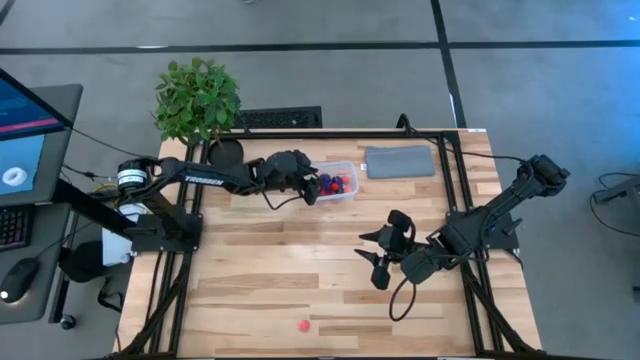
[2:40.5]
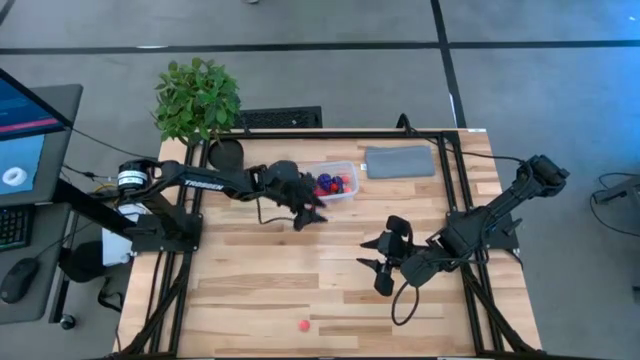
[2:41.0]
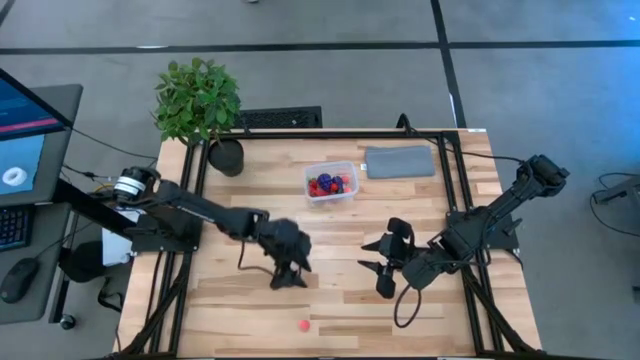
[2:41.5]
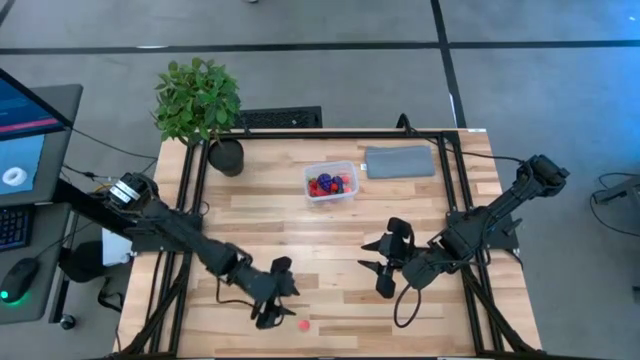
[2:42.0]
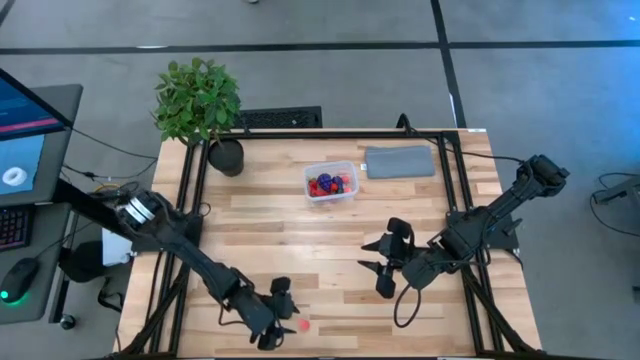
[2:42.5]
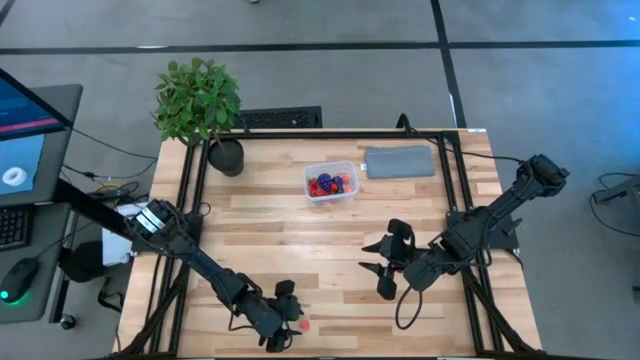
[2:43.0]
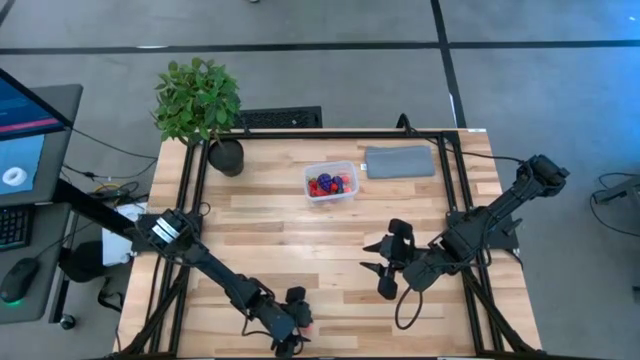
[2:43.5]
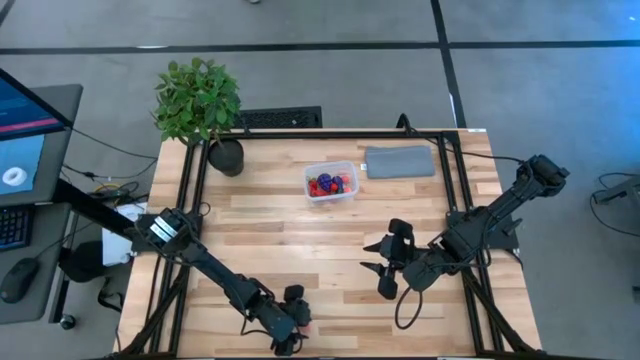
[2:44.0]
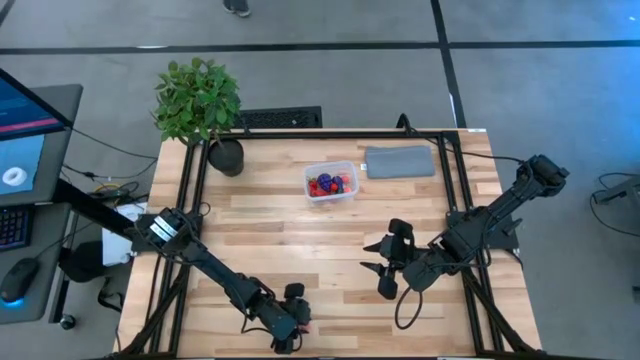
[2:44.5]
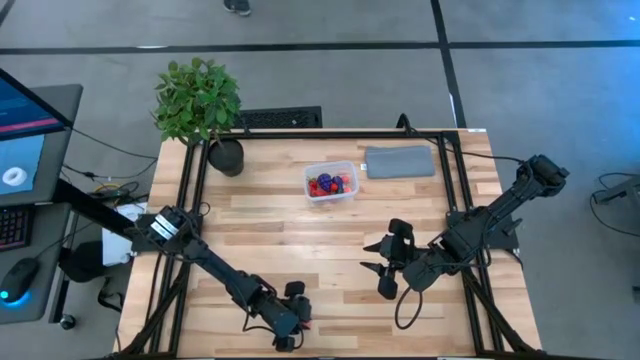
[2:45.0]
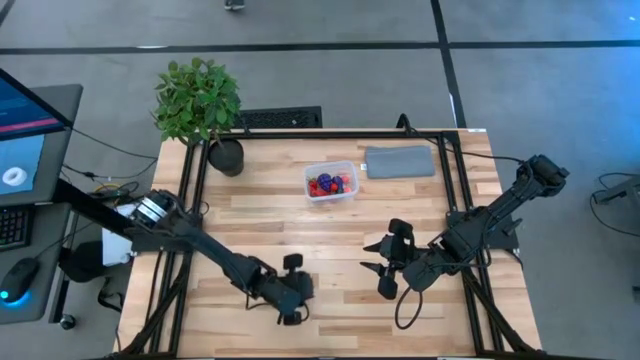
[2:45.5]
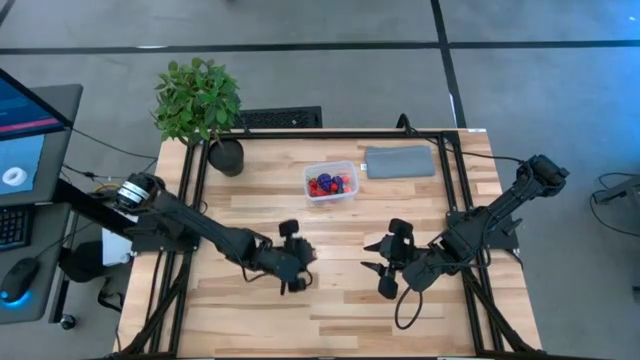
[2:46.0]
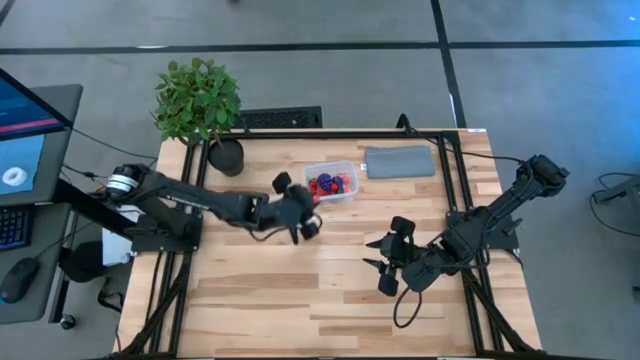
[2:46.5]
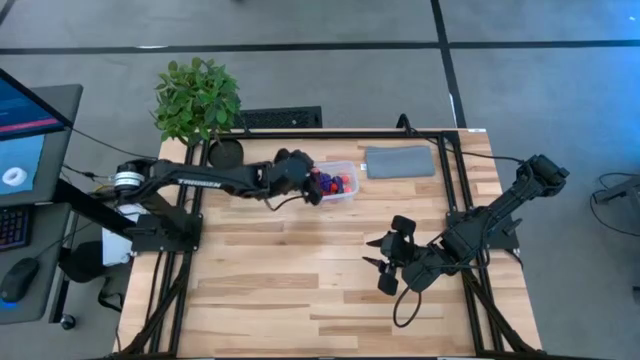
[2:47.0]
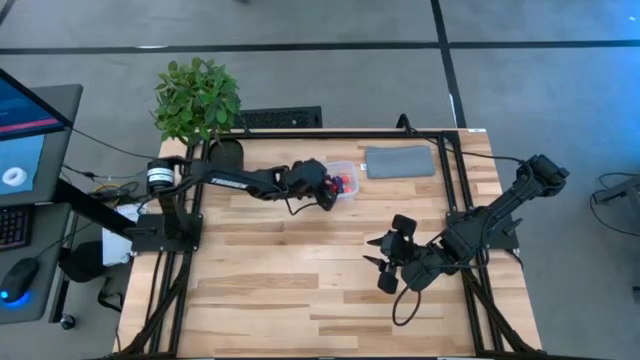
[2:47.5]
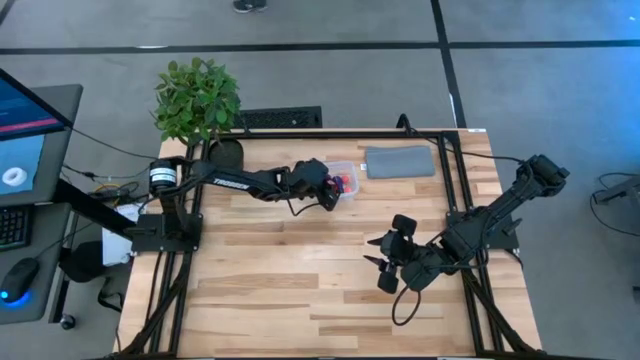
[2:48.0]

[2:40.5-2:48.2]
Task: Pick and placing Produce into tupperware
Put the apricot into the container

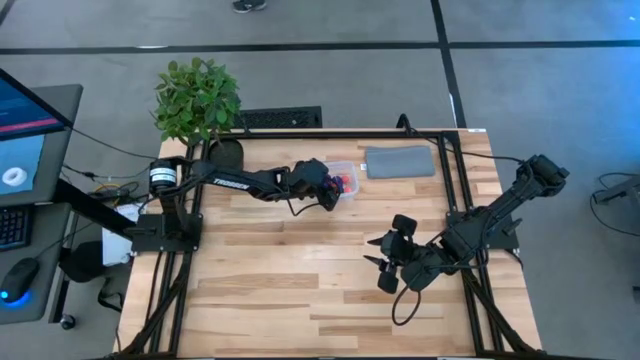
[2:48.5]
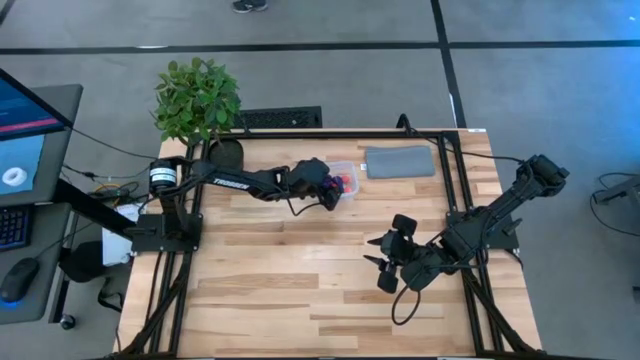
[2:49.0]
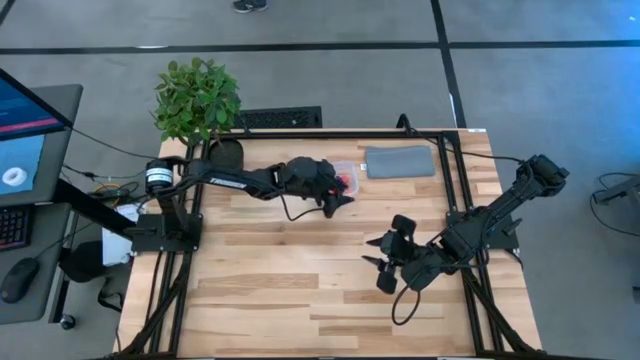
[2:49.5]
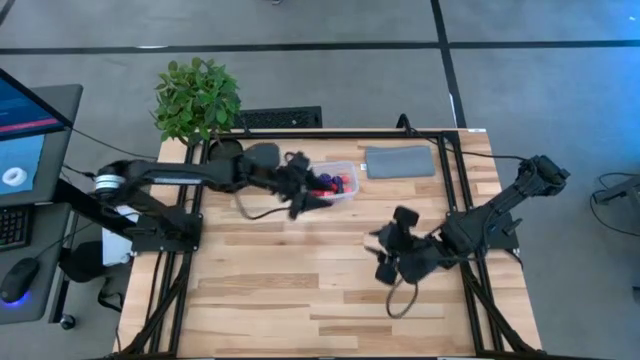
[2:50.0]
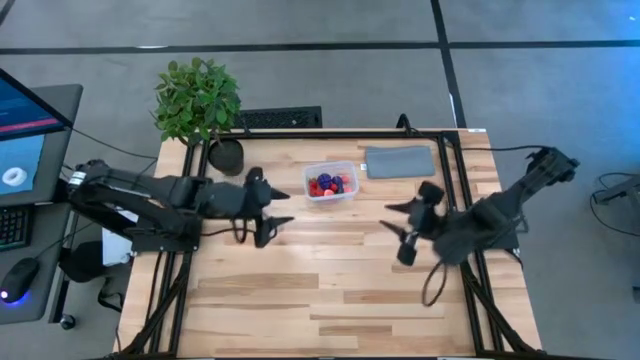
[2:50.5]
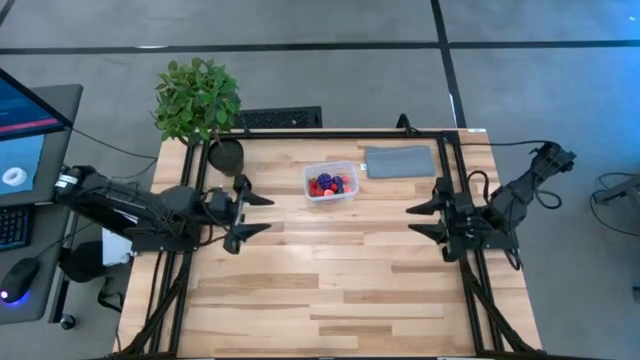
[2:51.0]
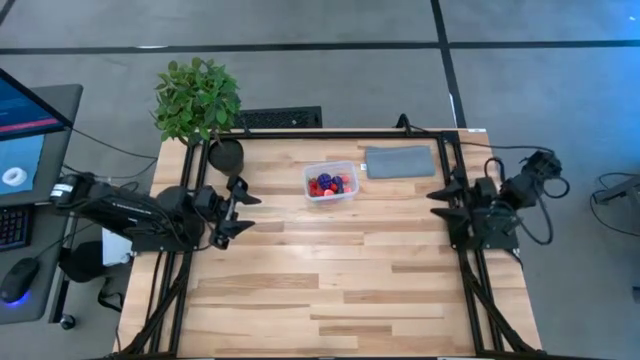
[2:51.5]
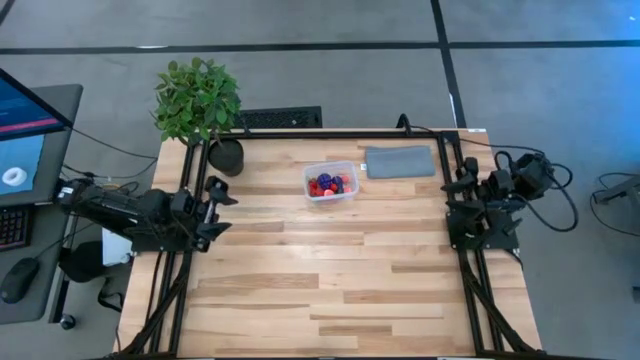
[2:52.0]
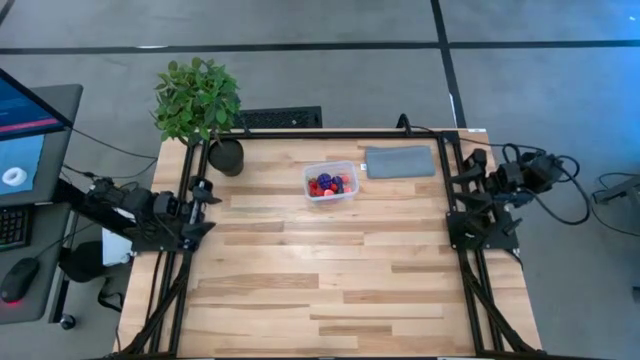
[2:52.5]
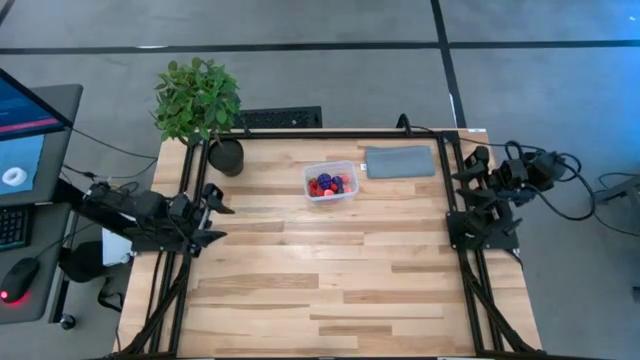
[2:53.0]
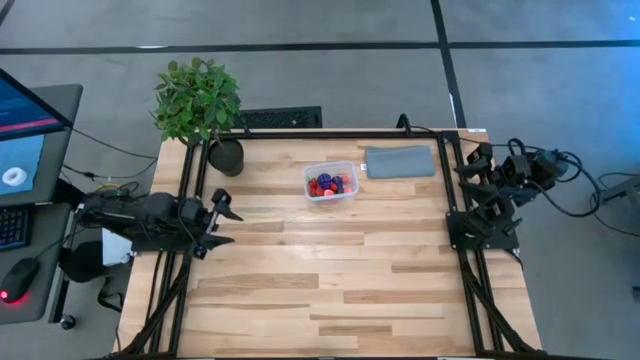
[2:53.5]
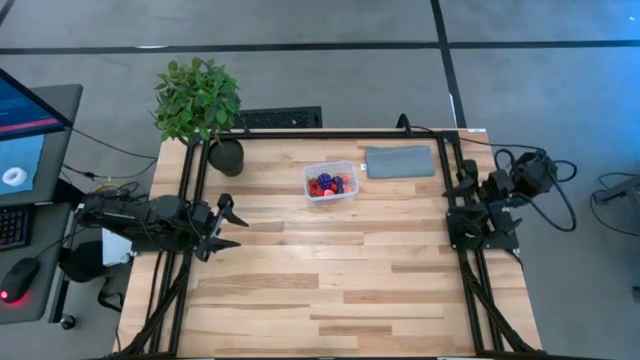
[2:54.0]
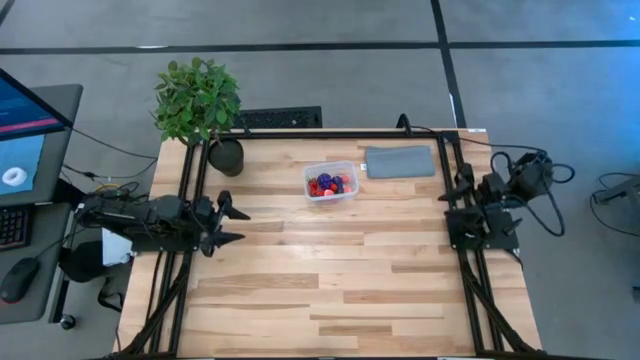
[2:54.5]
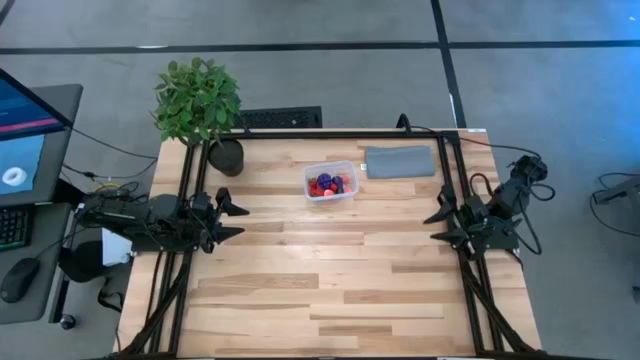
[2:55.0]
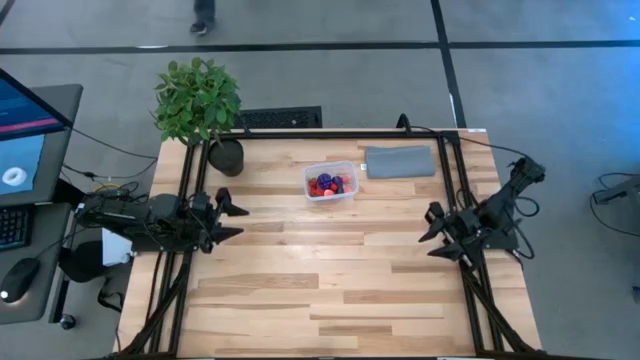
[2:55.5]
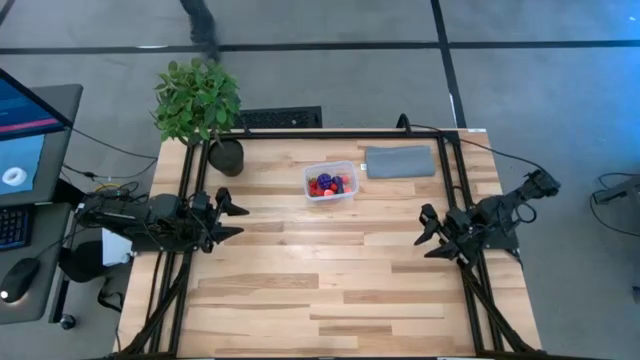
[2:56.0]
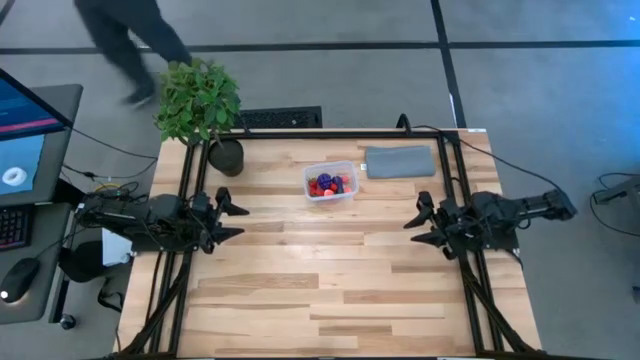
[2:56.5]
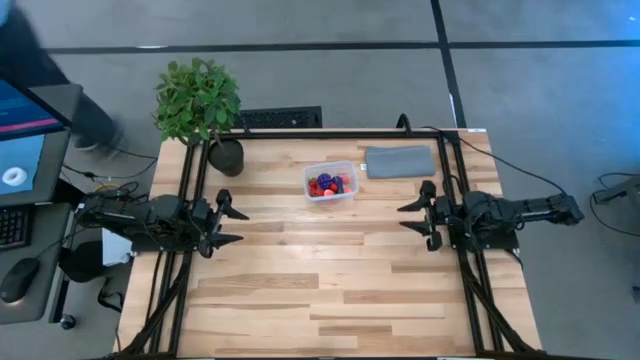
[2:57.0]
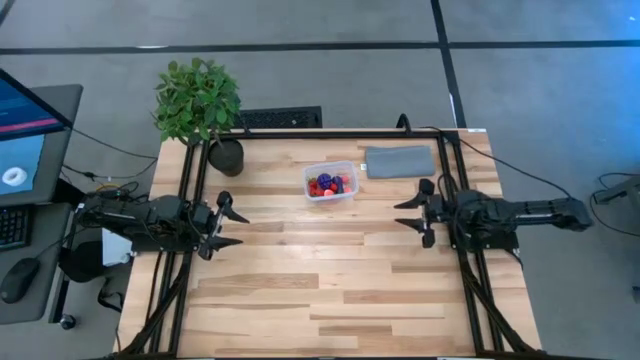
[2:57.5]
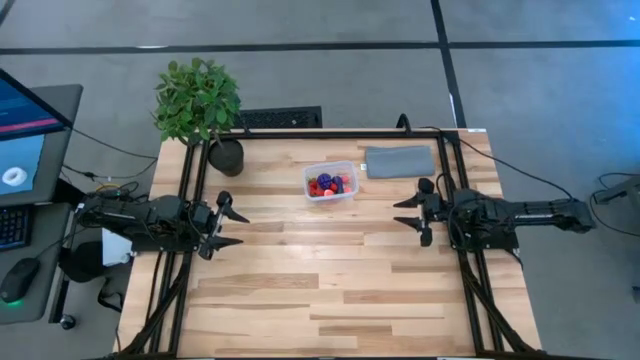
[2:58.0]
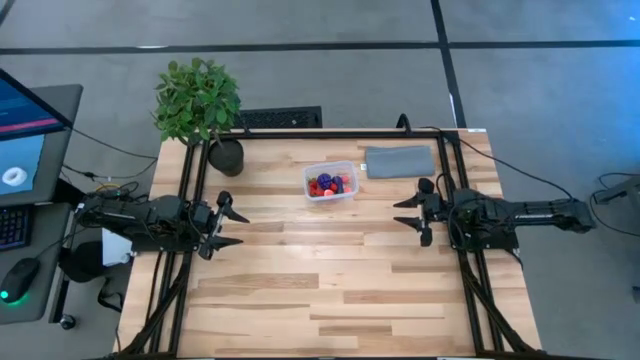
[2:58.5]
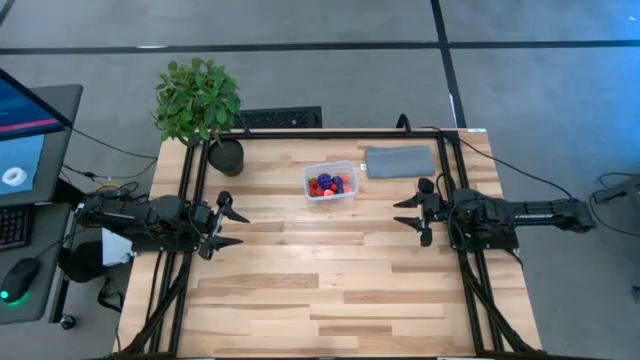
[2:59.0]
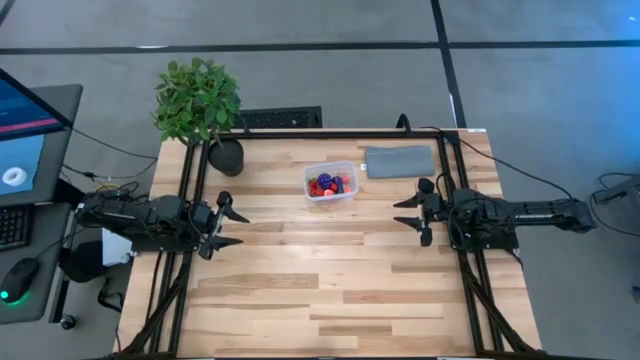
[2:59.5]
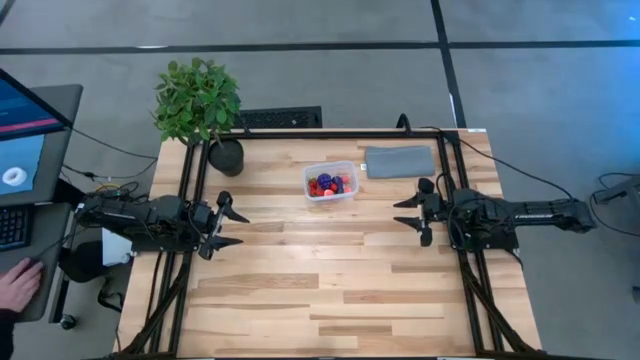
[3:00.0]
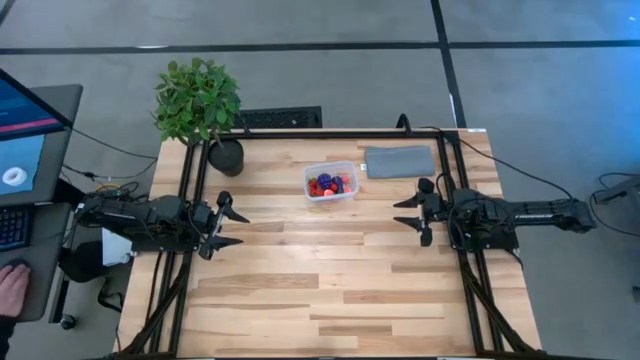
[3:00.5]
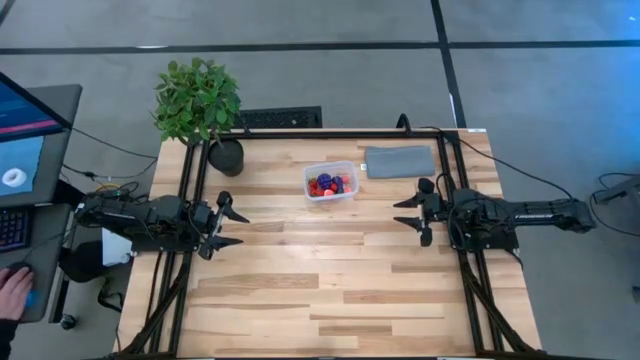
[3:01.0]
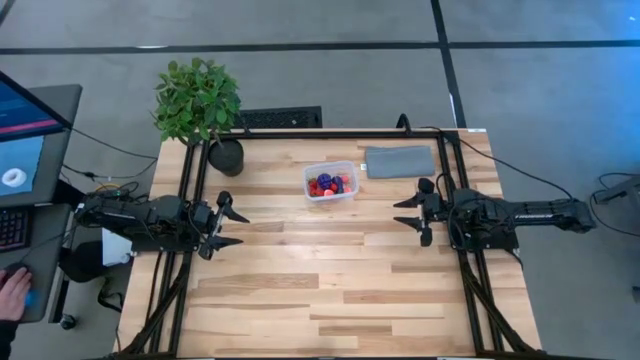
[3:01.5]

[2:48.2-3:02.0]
Return to Home Position
